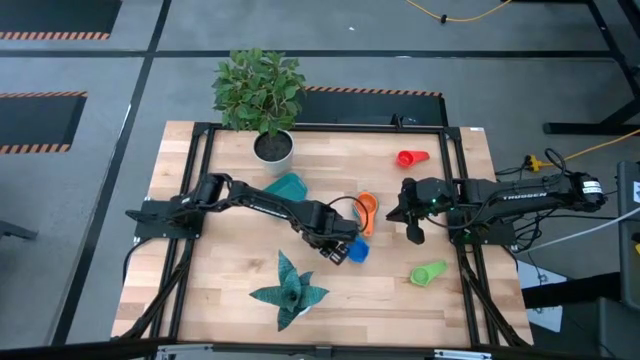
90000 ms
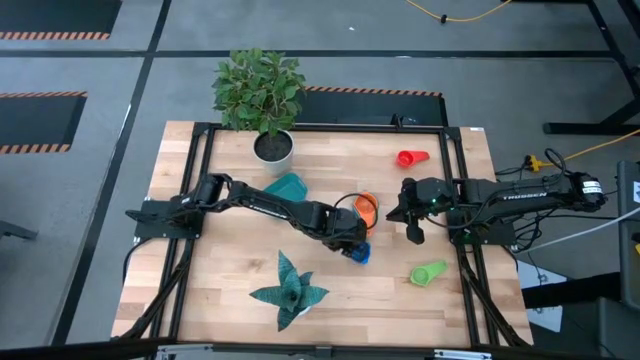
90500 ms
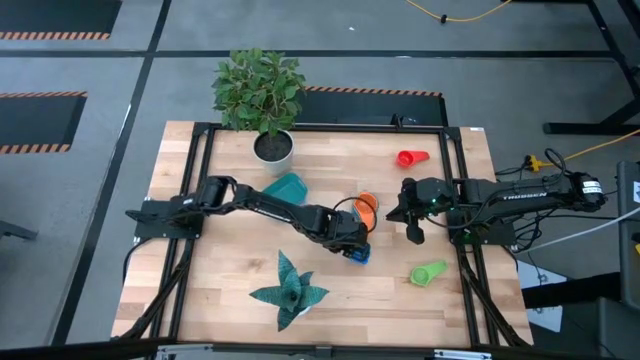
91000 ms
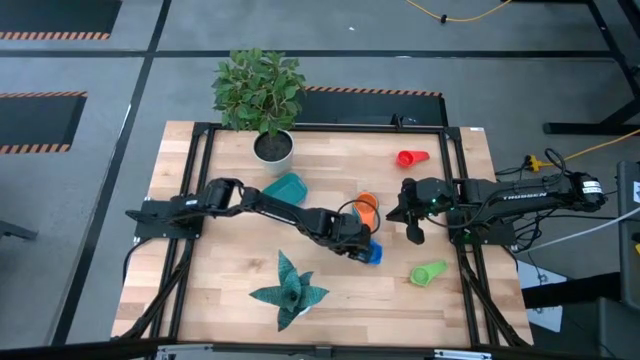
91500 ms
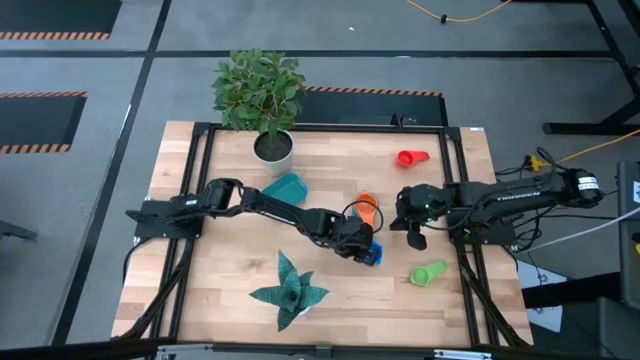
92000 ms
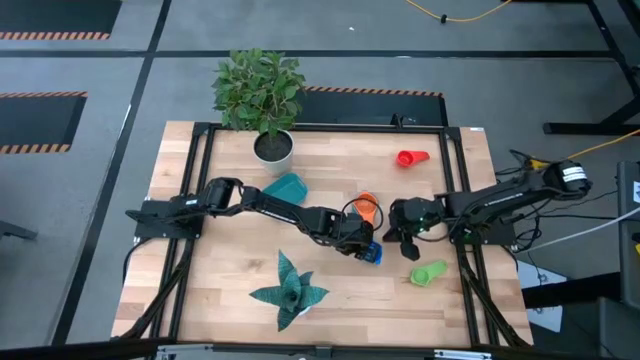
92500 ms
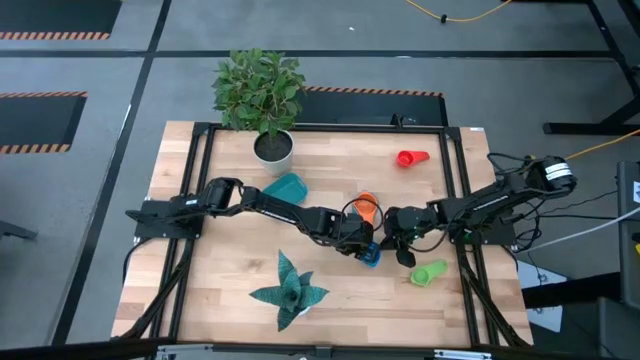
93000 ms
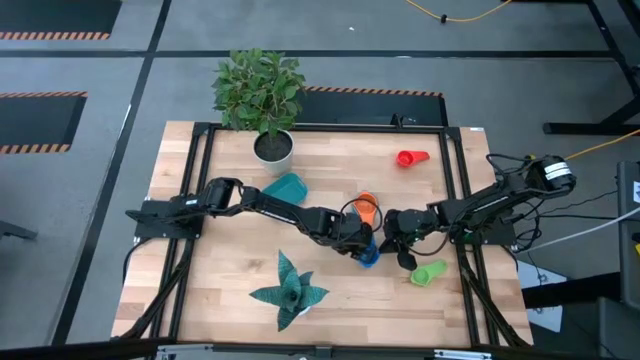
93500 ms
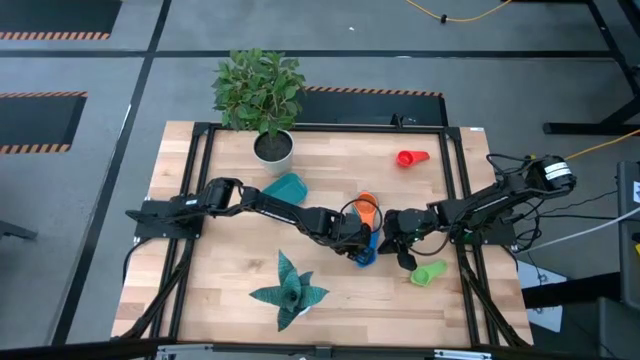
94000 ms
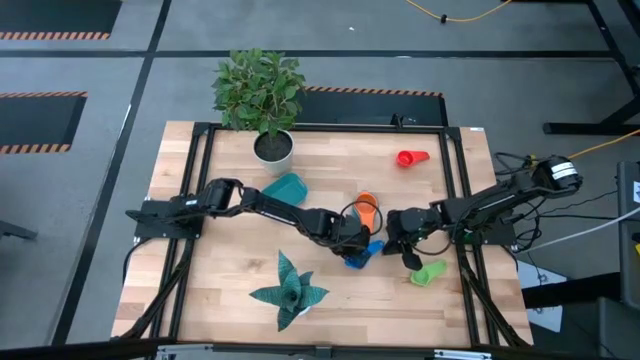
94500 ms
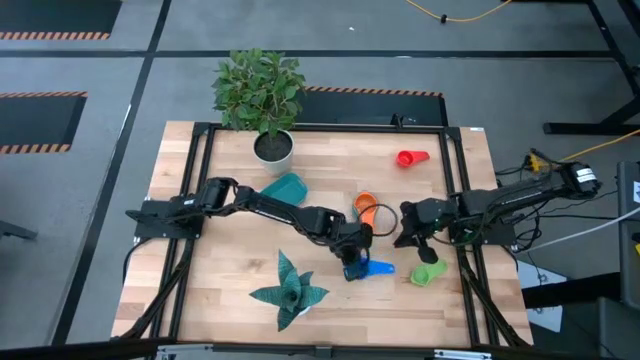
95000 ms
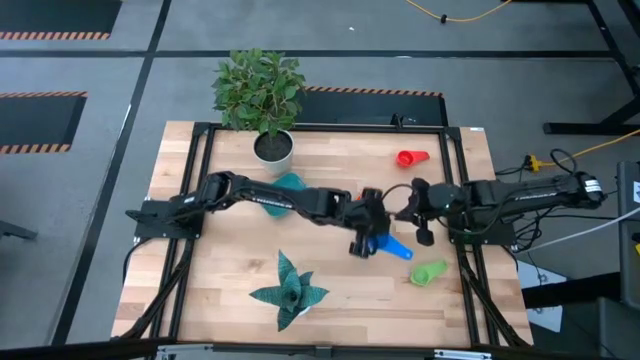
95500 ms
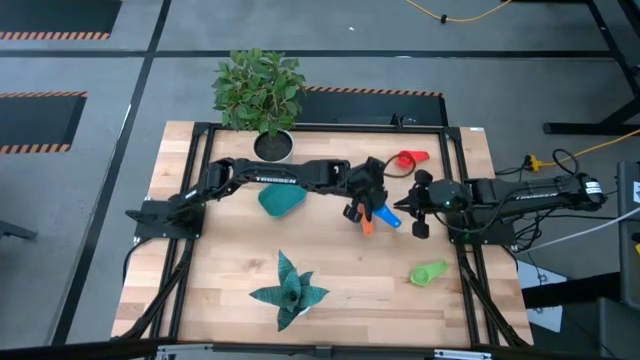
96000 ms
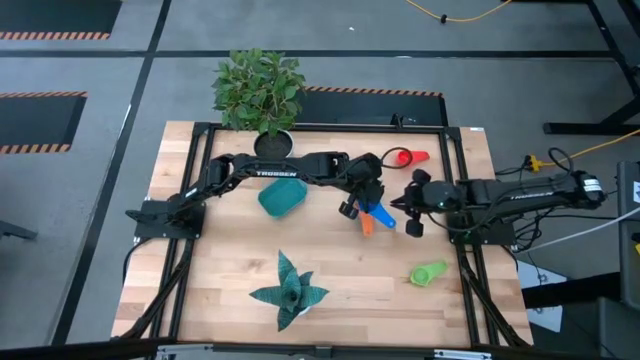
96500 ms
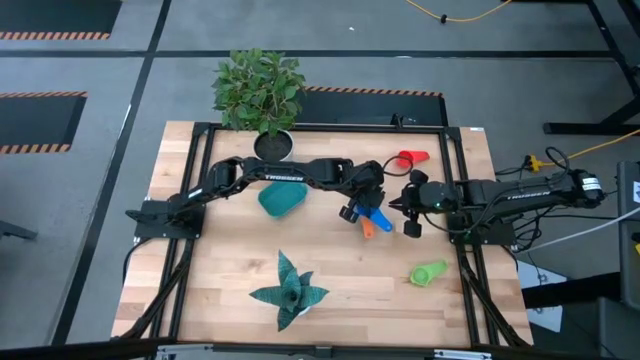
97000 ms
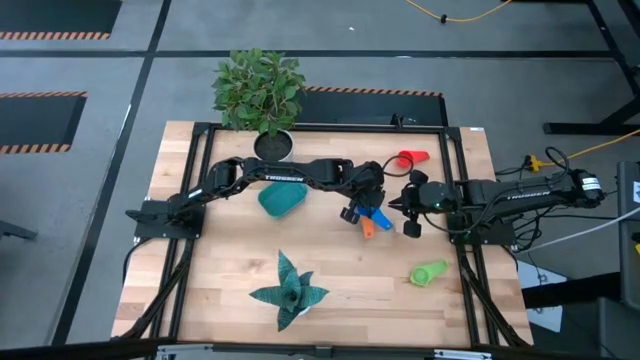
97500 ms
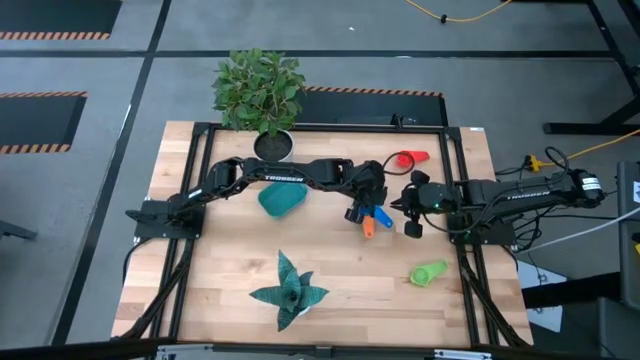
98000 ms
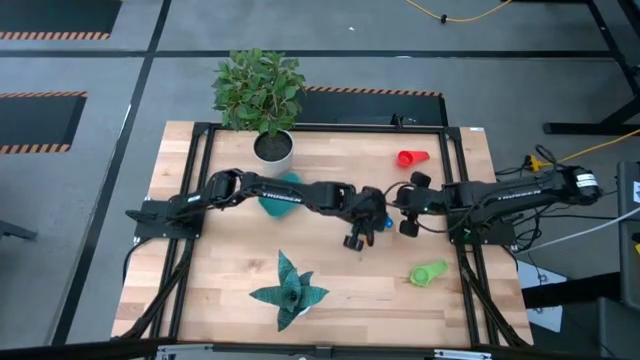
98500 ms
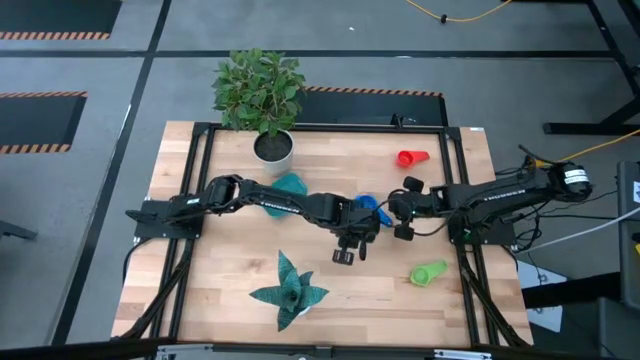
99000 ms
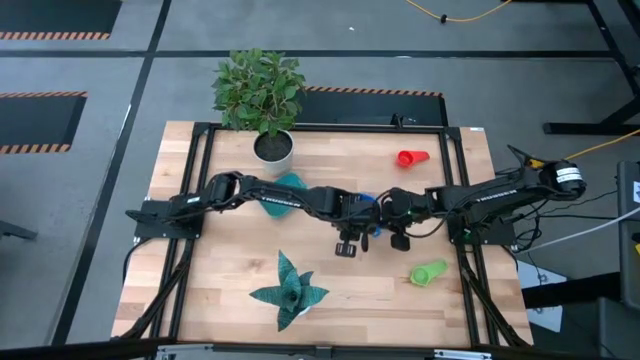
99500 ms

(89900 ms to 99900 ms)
Task: Nest measuring cups in basket
Stack the blue measuring cup on top of the orange measuring cup

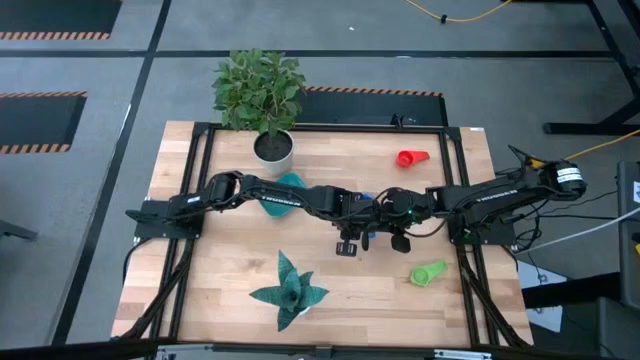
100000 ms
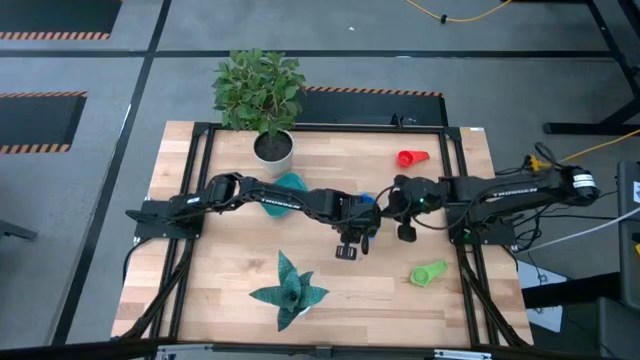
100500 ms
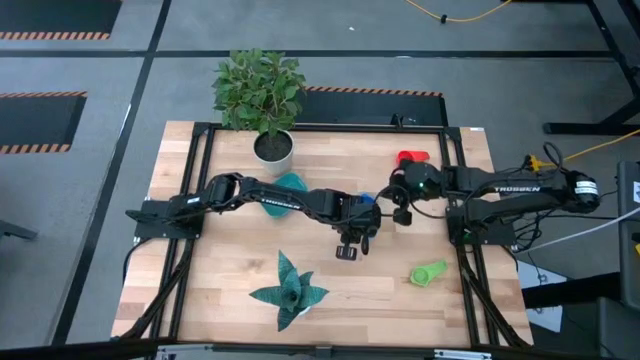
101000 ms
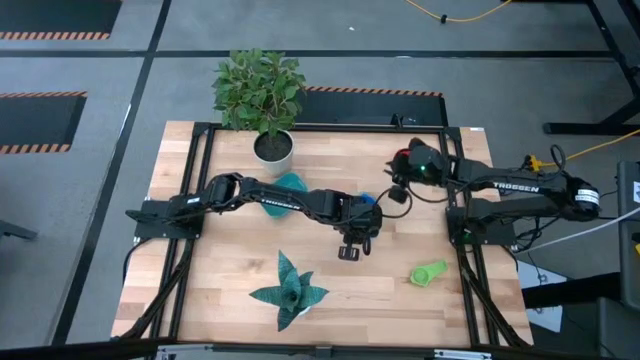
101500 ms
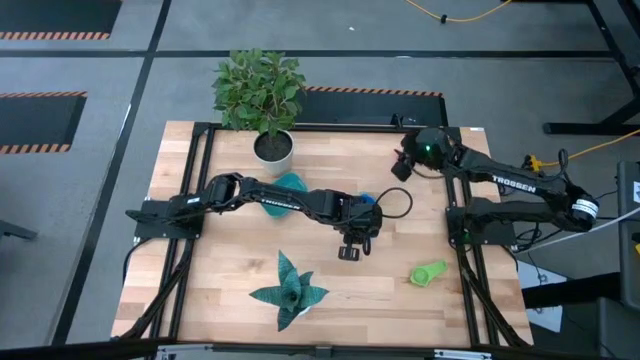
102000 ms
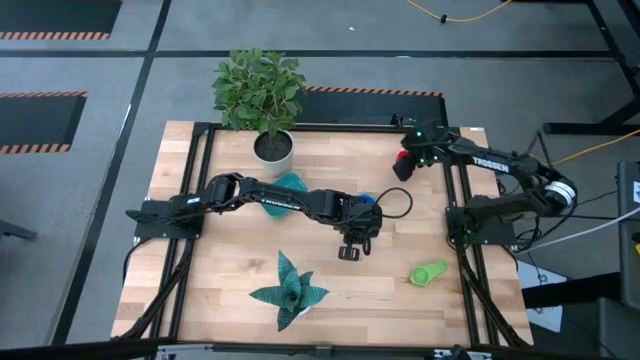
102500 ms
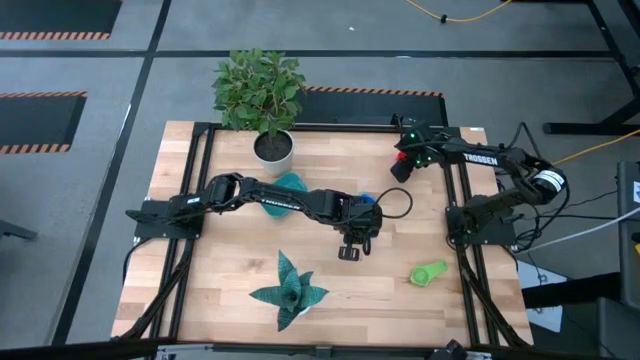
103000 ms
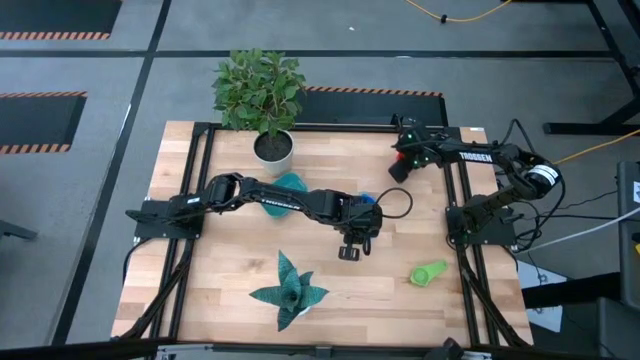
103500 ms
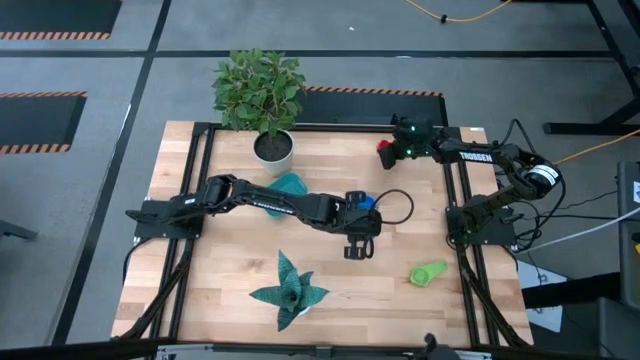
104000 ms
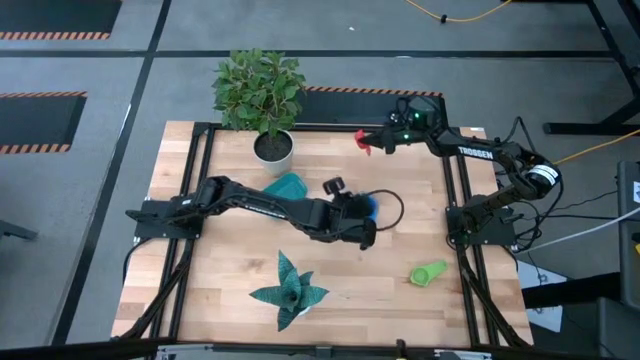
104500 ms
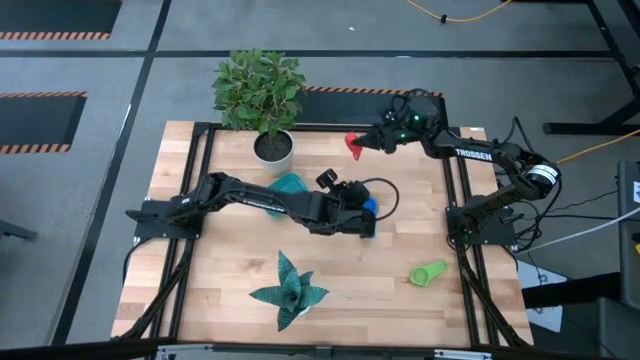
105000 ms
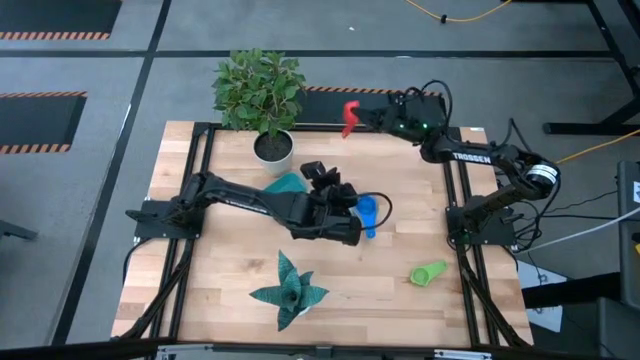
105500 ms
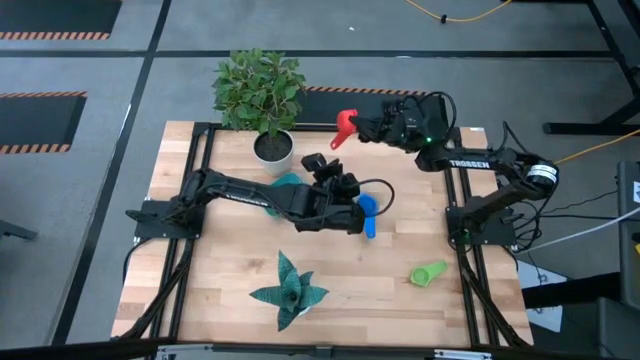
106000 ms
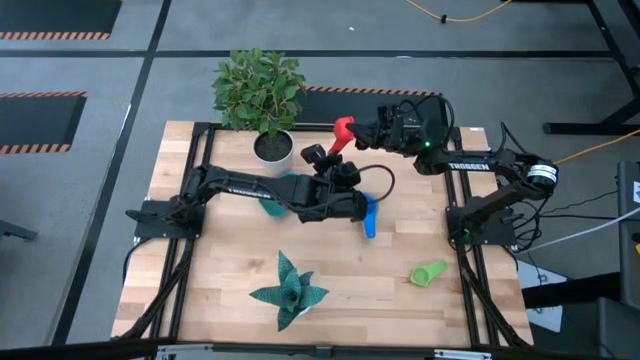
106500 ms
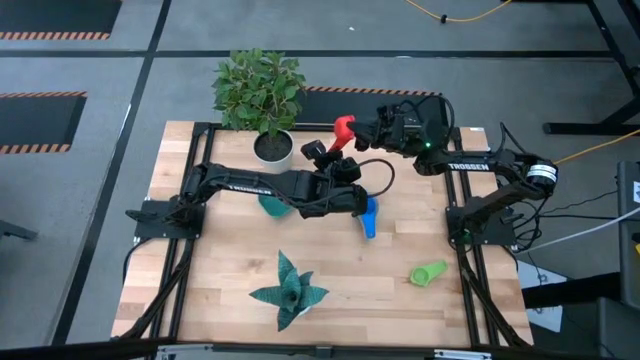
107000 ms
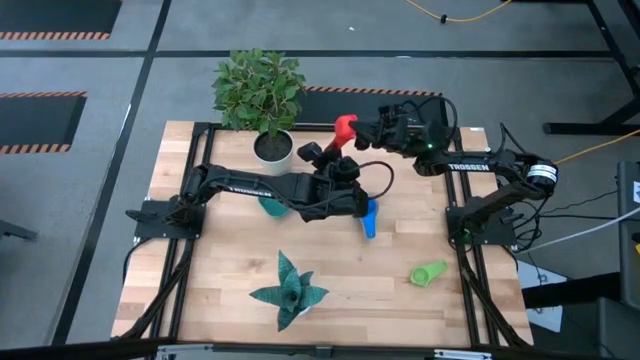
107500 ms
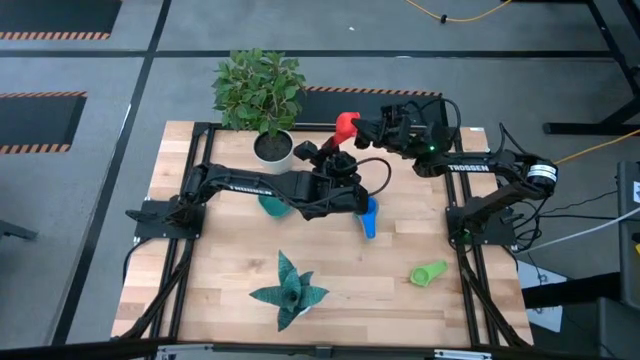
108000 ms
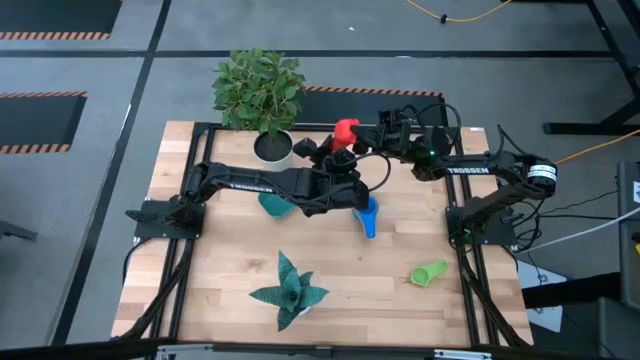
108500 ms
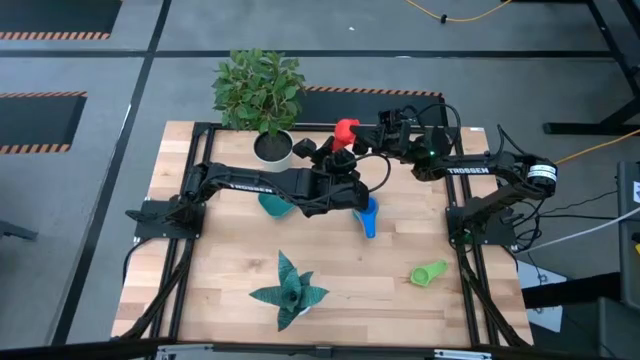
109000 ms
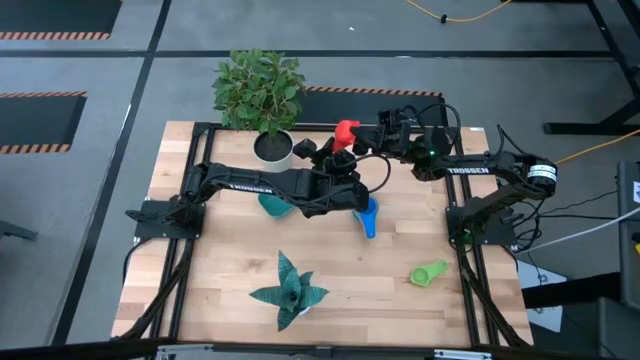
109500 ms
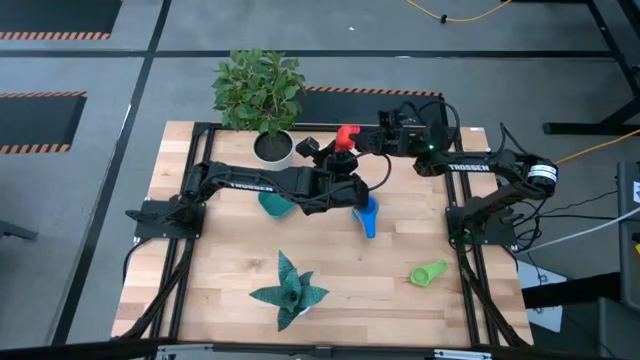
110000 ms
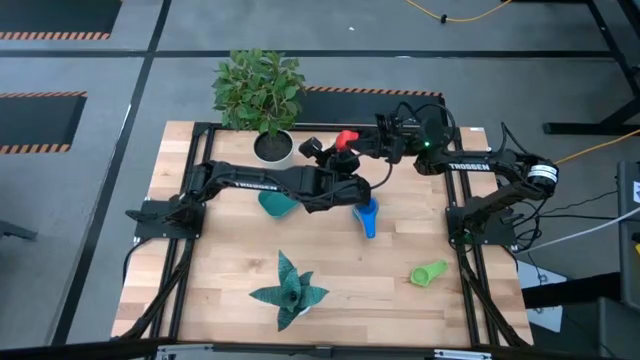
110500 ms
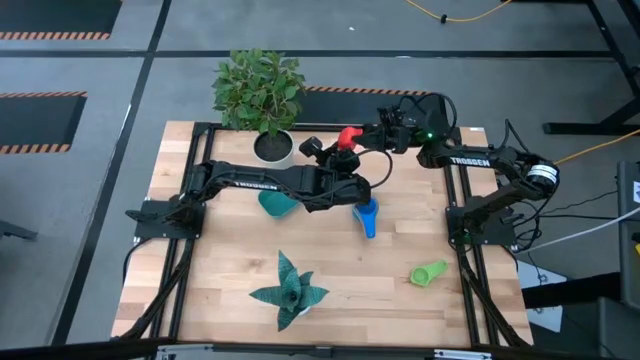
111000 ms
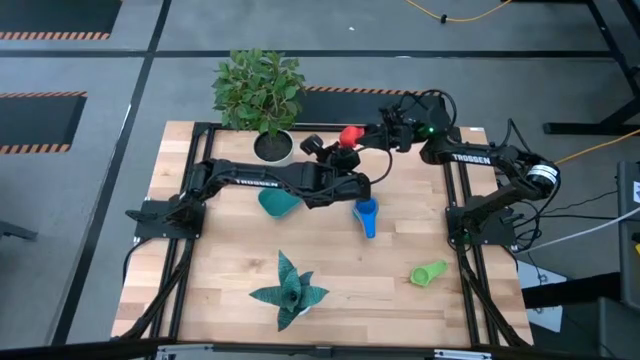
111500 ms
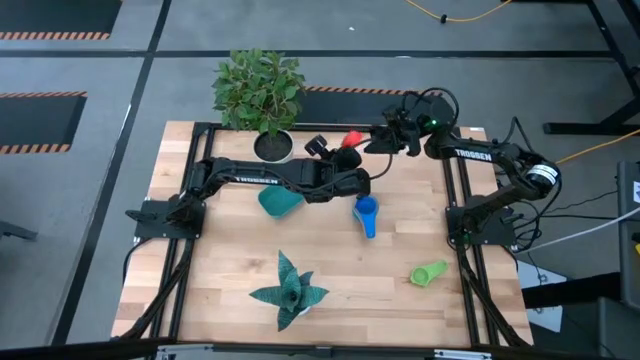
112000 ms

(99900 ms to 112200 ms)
Stack the red measuring cup on top of the blue measuring cup
